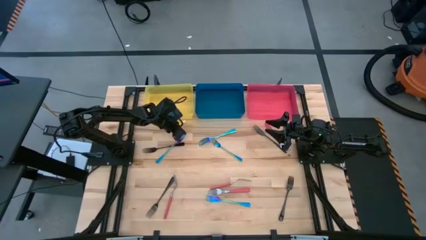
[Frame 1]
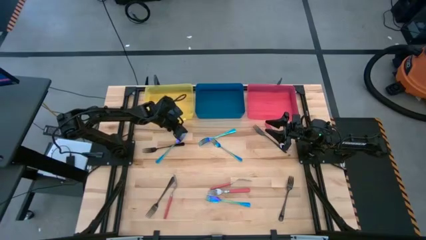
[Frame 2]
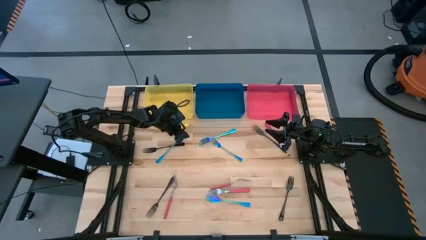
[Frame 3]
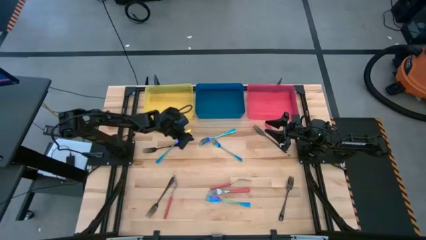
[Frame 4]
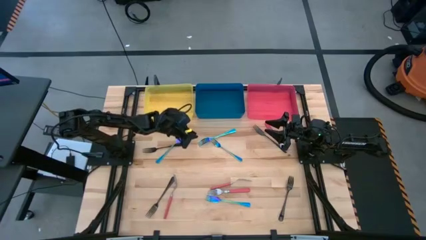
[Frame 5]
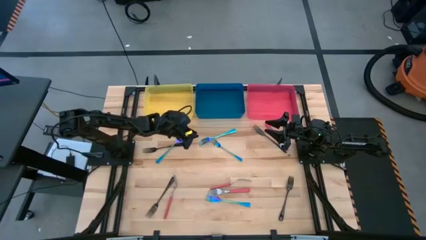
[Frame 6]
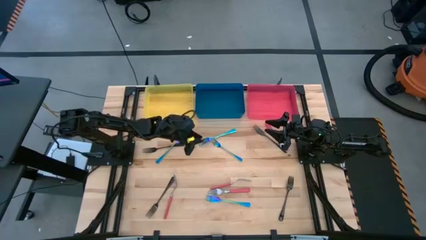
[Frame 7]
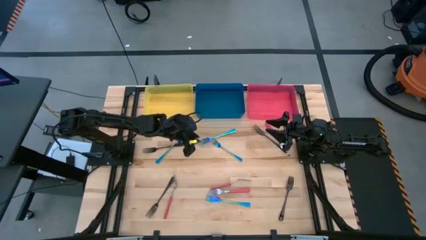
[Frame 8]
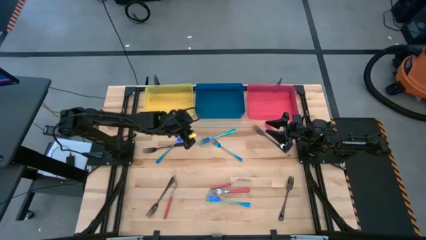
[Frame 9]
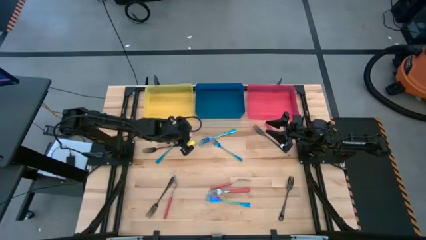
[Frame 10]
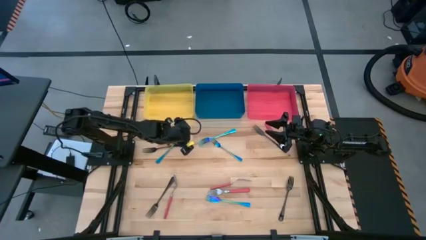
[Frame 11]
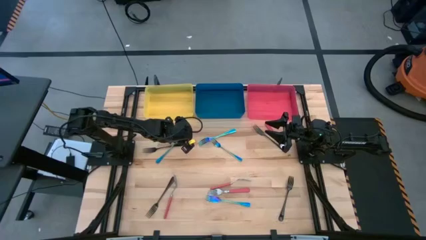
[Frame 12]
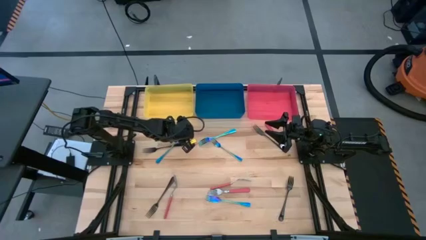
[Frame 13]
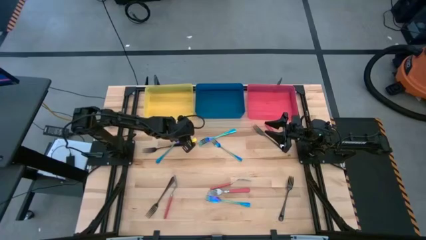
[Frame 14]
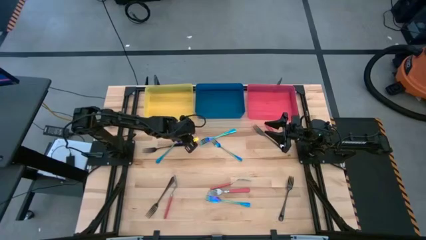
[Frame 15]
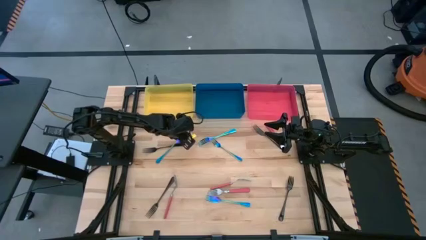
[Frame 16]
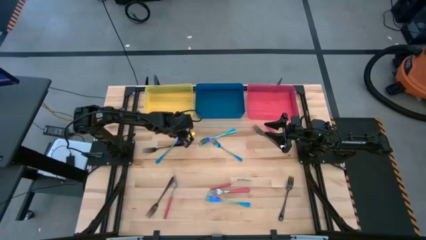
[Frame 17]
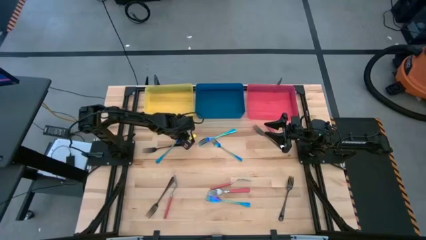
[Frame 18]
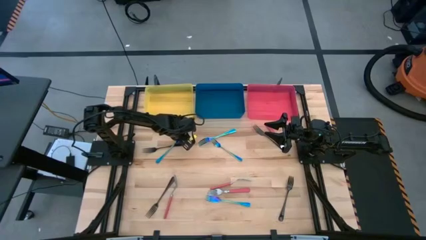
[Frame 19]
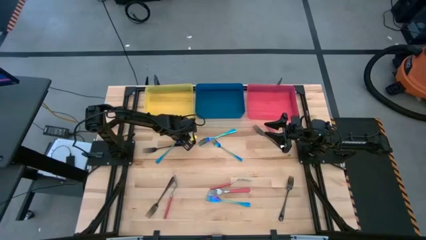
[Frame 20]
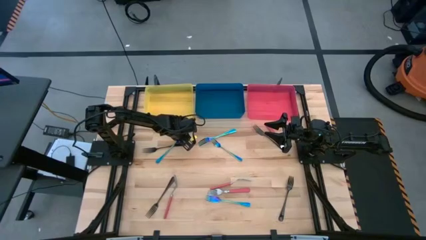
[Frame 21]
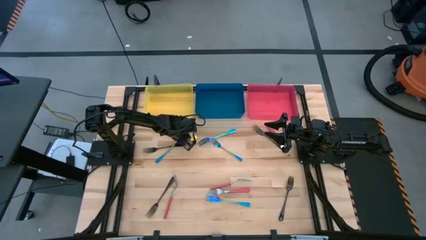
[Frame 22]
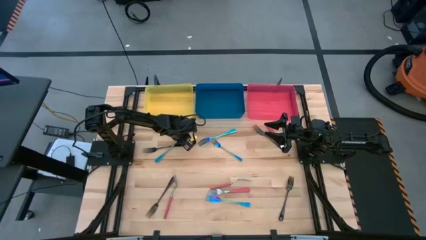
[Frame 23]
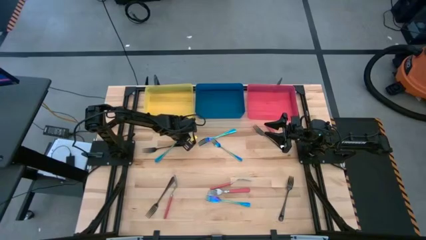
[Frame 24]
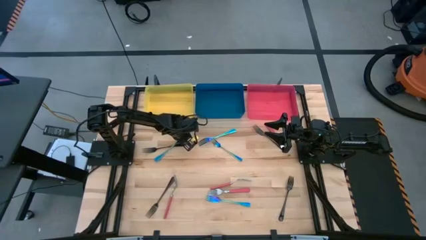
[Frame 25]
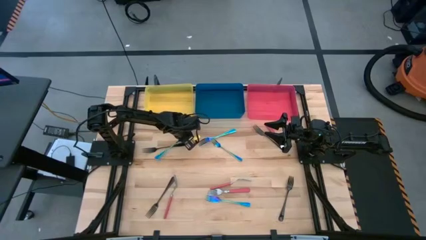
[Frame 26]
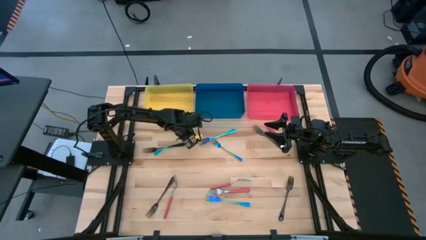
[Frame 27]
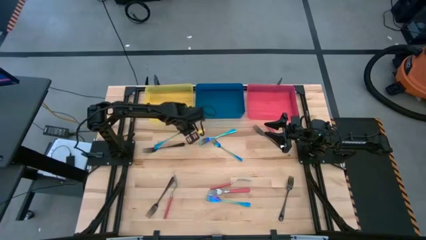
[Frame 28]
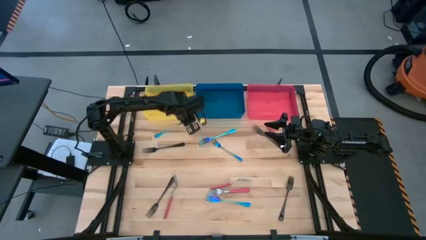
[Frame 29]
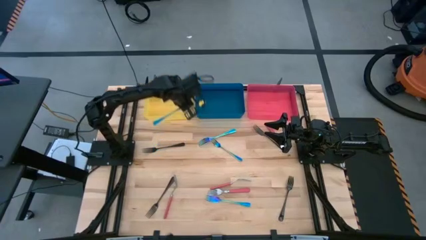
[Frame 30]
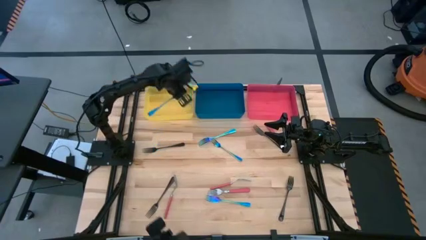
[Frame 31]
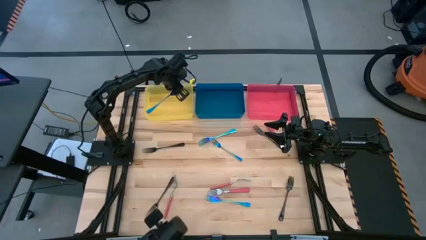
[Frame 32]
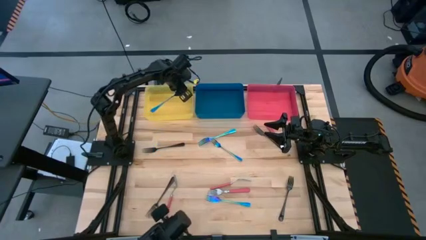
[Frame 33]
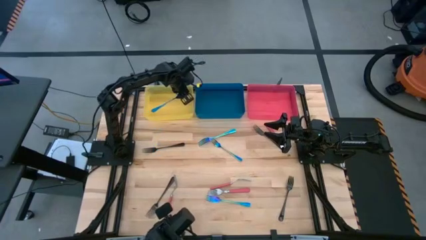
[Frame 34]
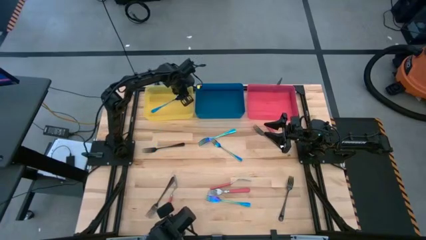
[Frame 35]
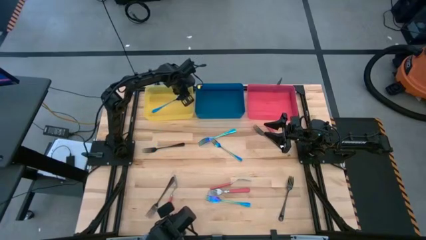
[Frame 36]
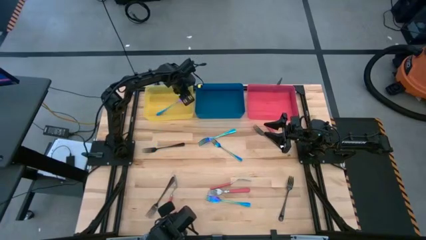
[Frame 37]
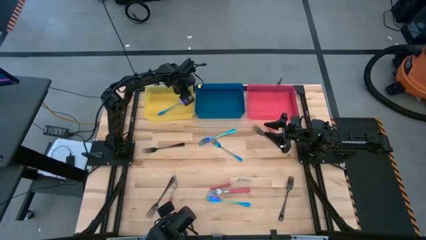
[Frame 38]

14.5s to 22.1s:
Task: Sort silverware by color (type)
Put the iridescent fork into the yellow bin

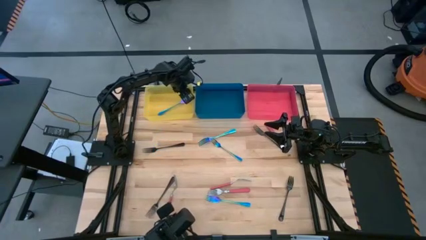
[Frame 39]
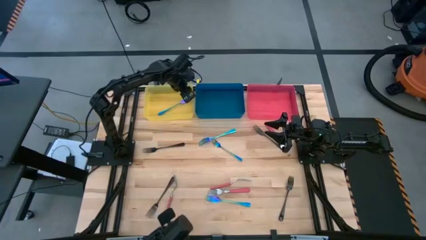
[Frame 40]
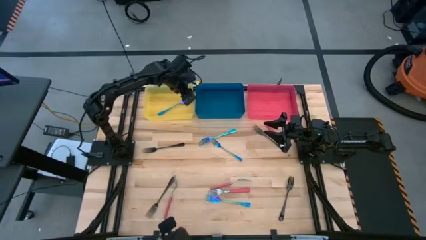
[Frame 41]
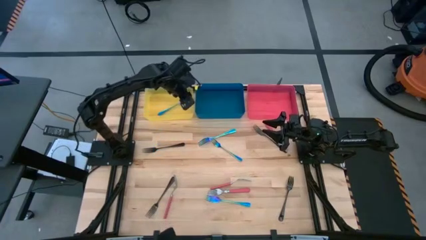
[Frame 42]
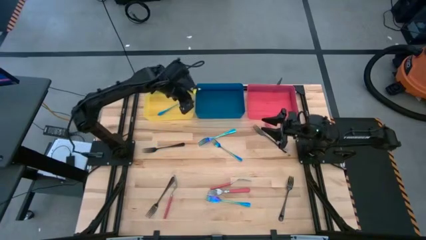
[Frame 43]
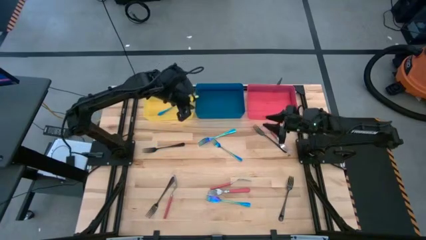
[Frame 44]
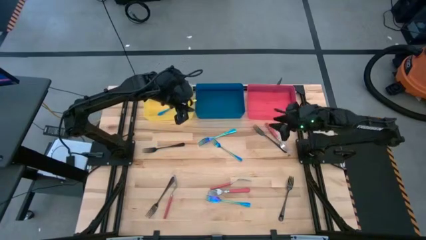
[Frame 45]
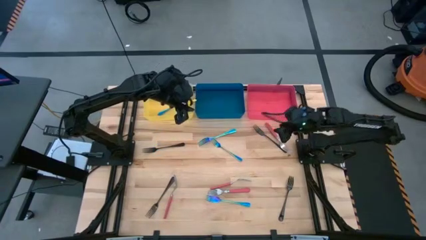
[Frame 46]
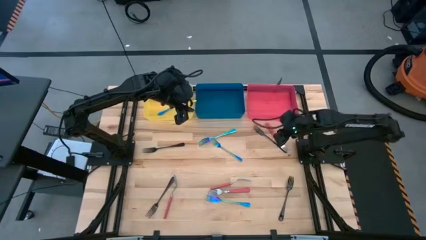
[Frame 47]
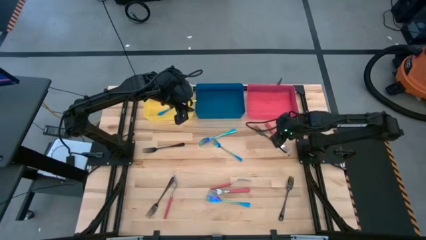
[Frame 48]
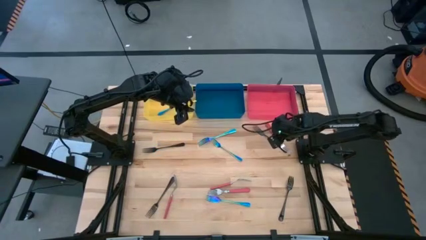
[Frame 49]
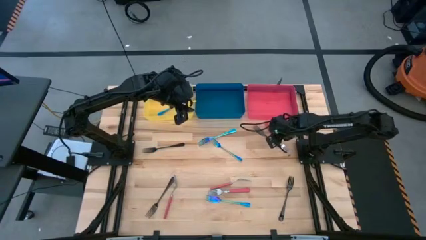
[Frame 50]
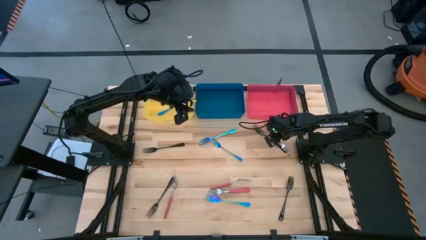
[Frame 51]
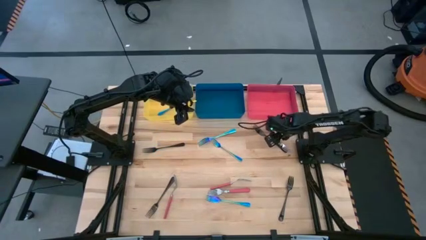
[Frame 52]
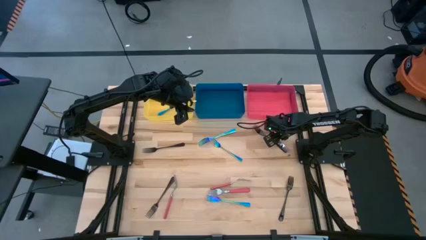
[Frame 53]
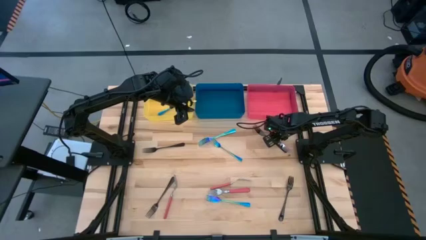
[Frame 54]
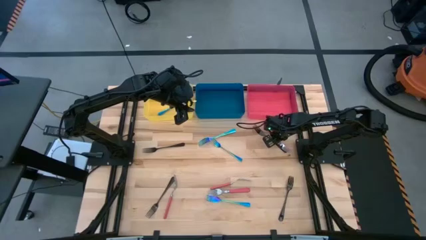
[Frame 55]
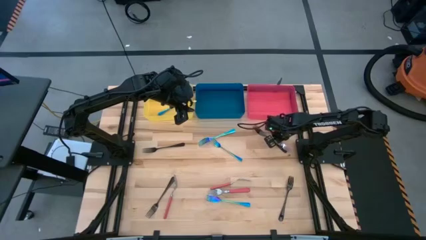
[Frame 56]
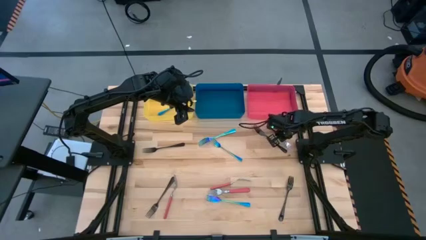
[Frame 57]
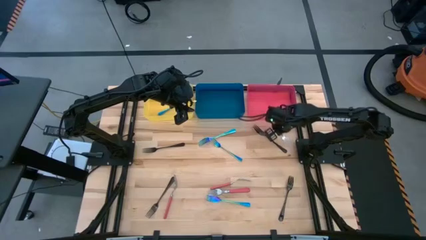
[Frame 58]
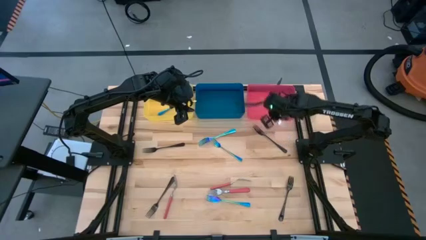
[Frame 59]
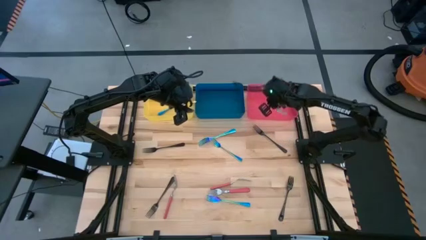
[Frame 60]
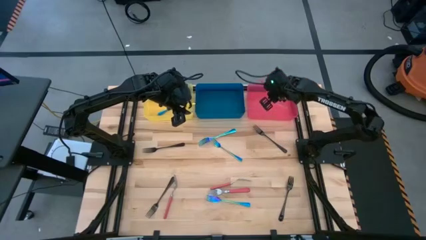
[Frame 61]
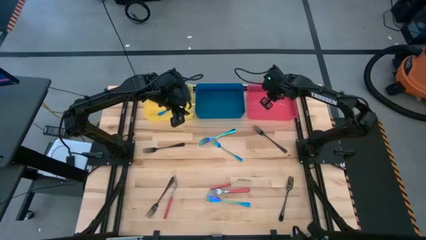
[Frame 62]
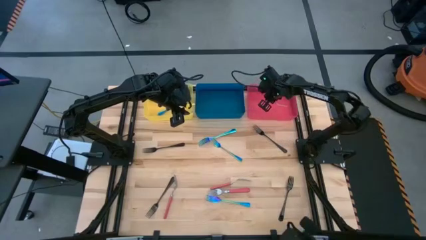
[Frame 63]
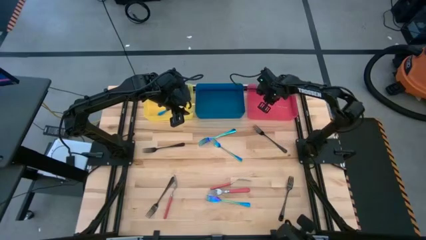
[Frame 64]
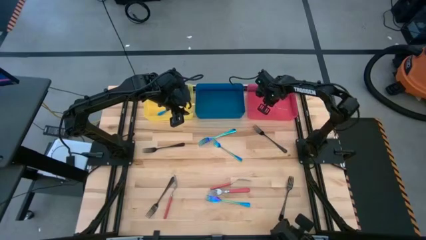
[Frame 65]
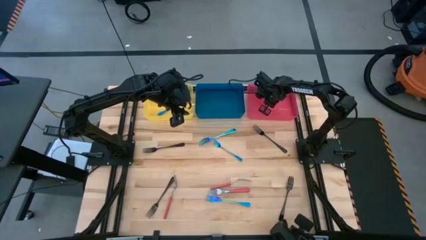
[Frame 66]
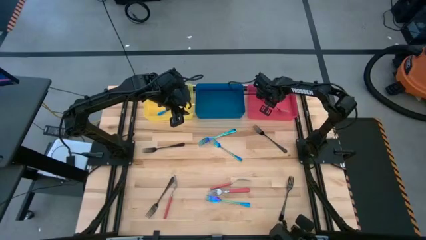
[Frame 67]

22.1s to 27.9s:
Put the pink fork into the pink bin

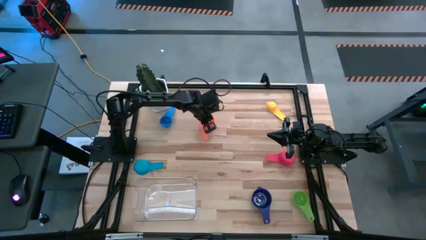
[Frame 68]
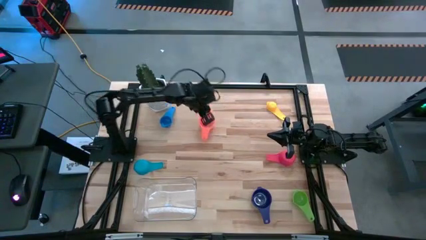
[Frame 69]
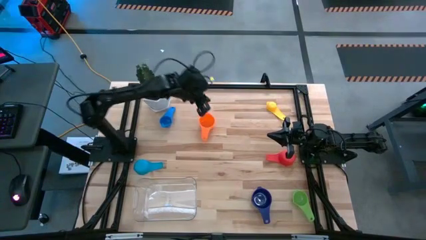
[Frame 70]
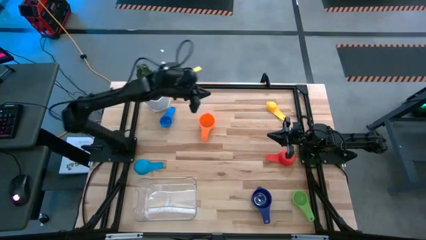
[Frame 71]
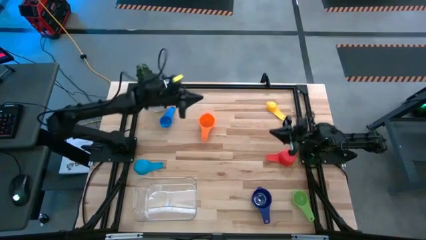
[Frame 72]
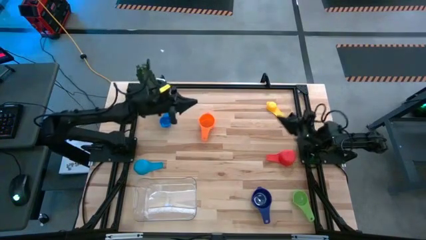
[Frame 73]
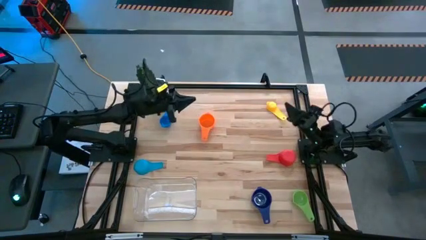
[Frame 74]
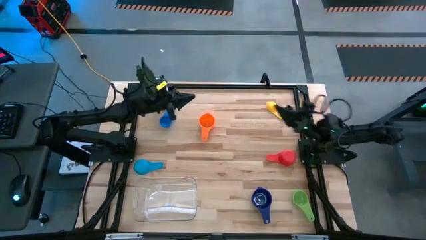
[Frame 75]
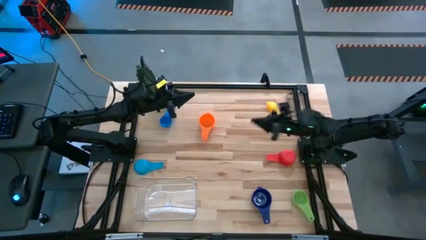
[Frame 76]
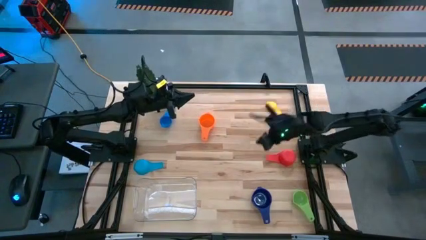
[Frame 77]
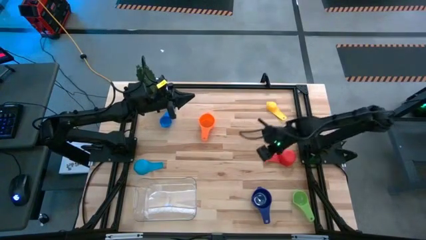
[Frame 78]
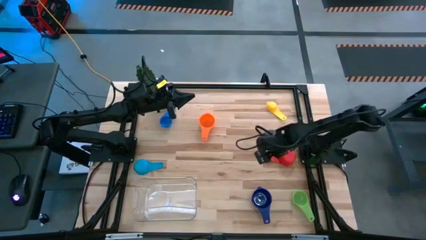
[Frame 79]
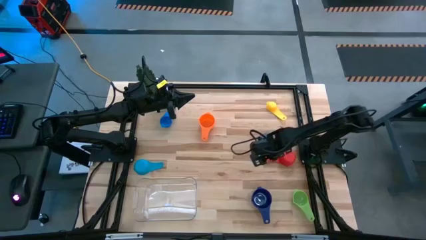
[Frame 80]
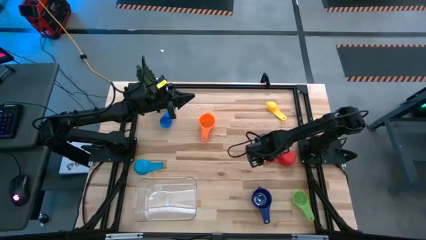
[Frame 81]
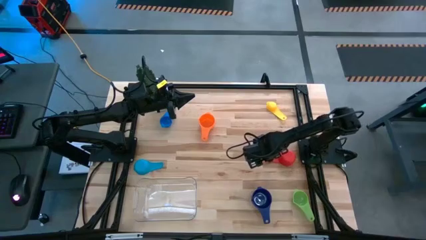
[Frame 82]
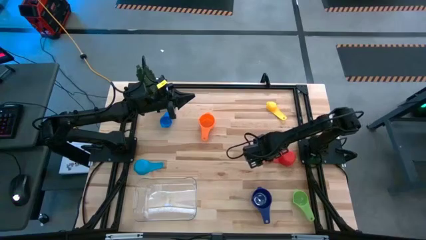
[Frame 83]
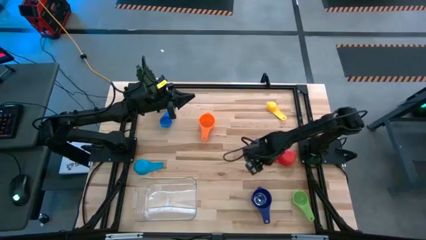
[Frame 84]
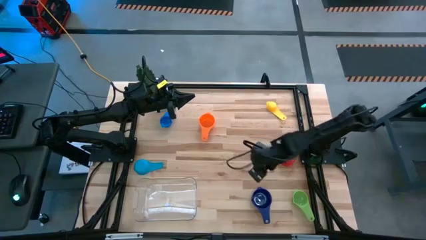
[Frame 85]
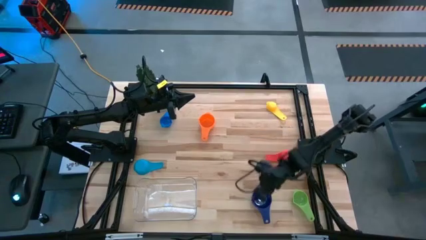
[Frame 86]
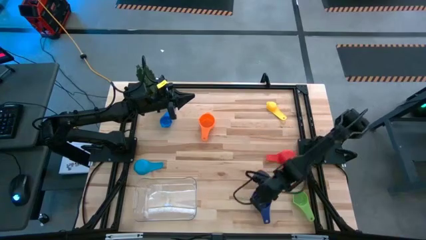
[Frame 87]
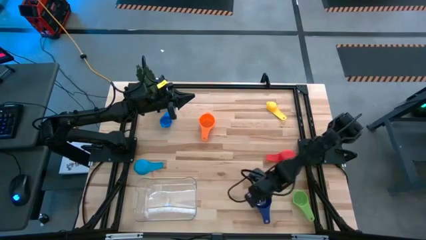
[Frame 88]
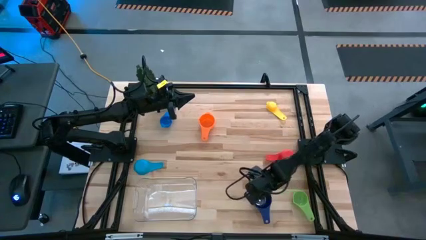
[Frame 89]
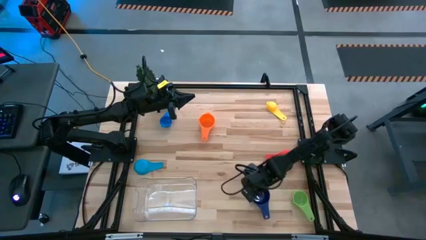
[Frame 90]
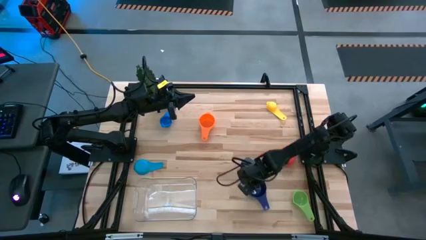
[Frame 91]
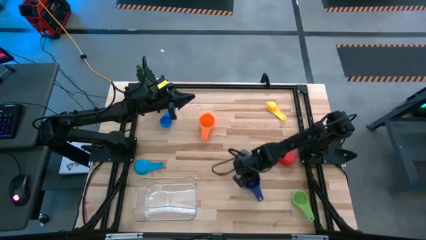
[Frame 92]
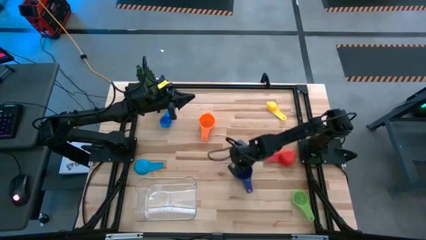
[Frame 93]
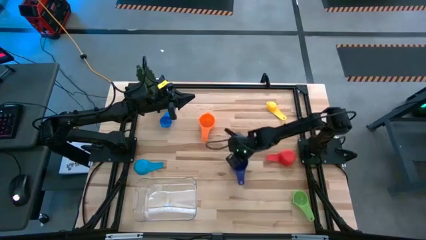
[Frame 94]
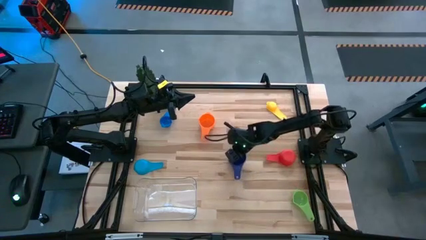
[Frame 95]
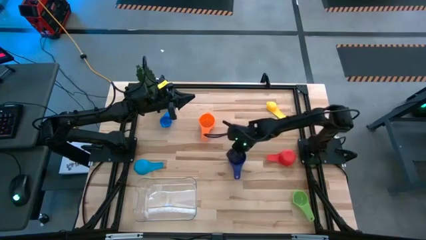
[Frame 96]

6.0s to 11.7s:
Task: Nest measuring cups in basket
Move the dark blue measuring cup to the center of the table
